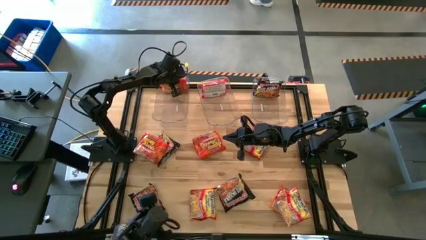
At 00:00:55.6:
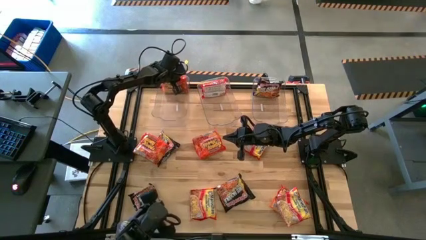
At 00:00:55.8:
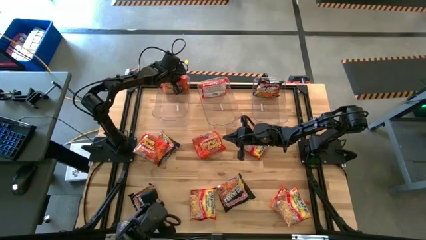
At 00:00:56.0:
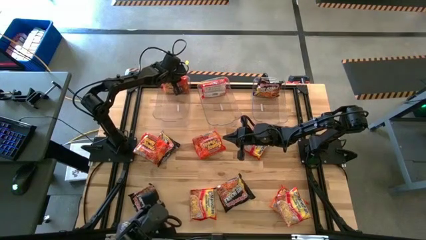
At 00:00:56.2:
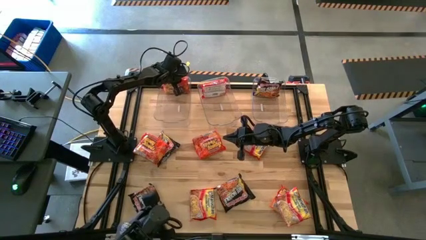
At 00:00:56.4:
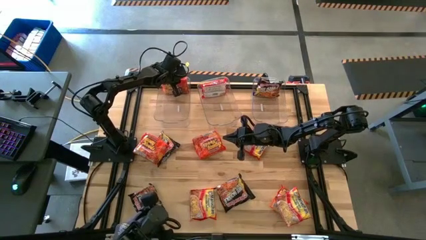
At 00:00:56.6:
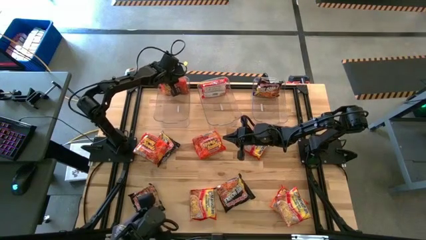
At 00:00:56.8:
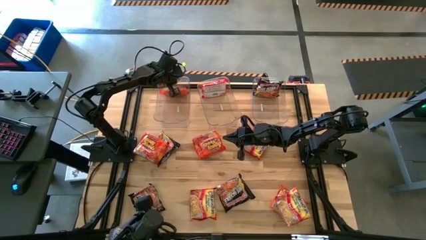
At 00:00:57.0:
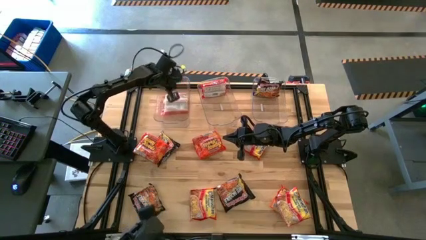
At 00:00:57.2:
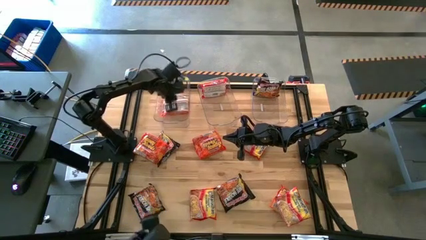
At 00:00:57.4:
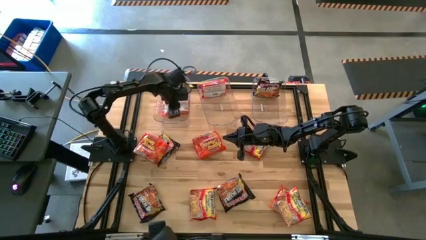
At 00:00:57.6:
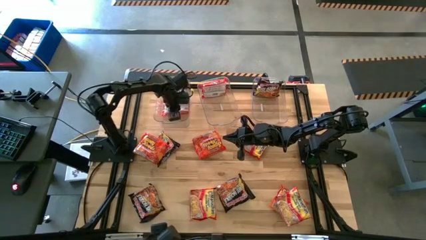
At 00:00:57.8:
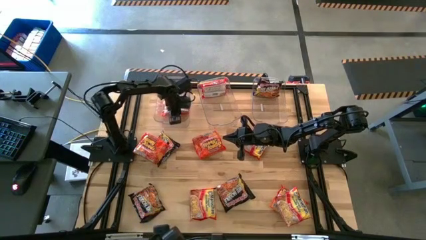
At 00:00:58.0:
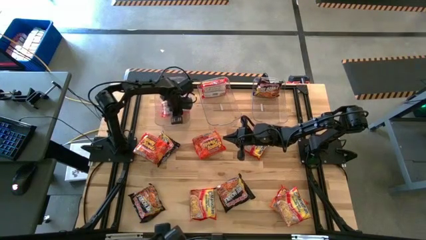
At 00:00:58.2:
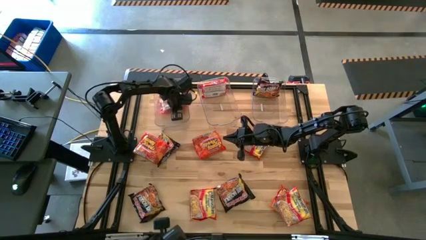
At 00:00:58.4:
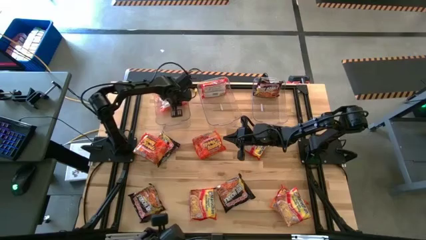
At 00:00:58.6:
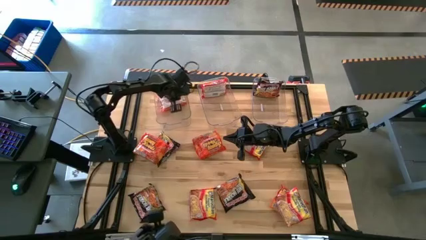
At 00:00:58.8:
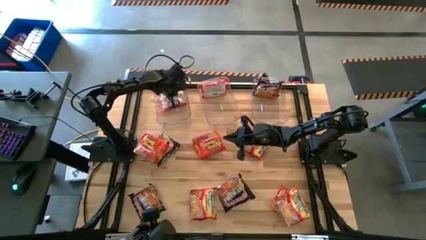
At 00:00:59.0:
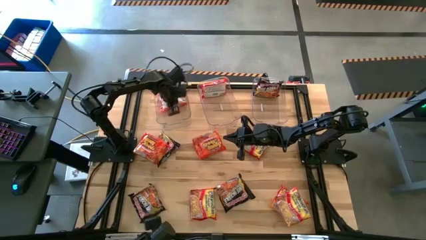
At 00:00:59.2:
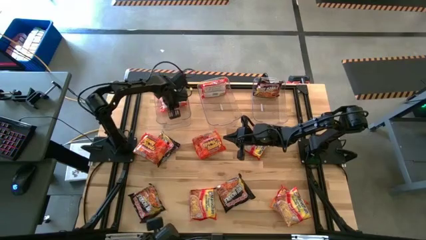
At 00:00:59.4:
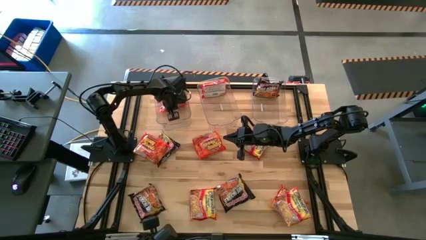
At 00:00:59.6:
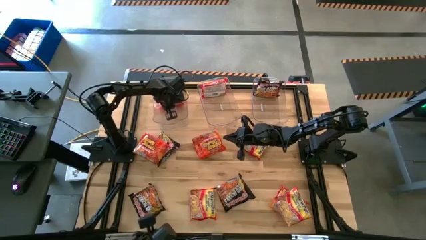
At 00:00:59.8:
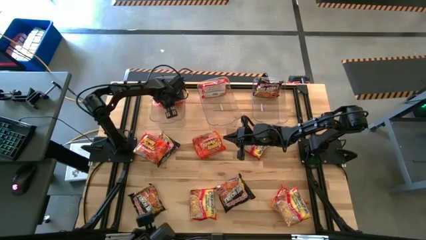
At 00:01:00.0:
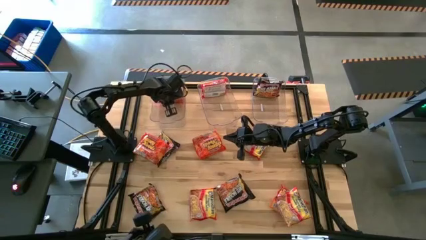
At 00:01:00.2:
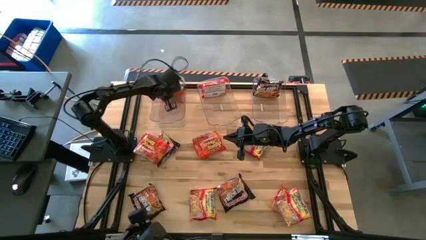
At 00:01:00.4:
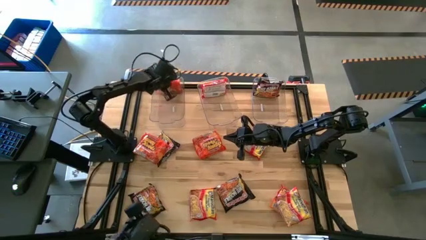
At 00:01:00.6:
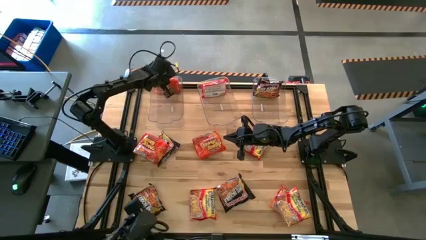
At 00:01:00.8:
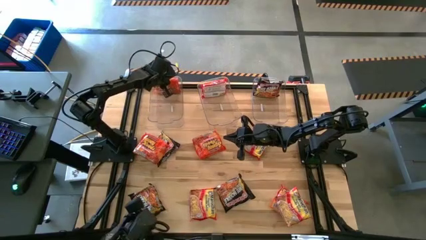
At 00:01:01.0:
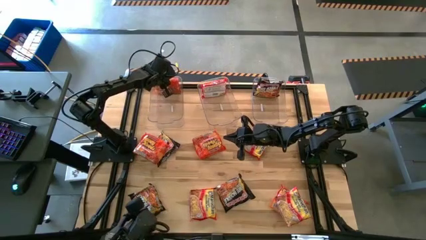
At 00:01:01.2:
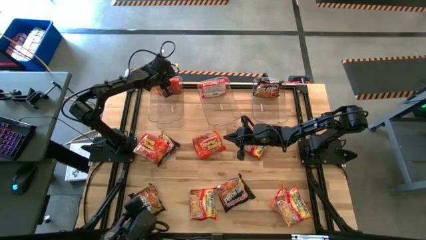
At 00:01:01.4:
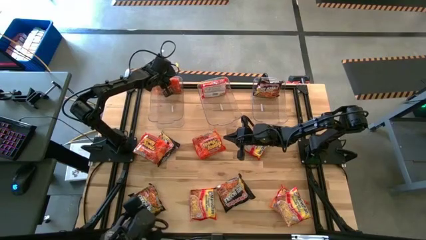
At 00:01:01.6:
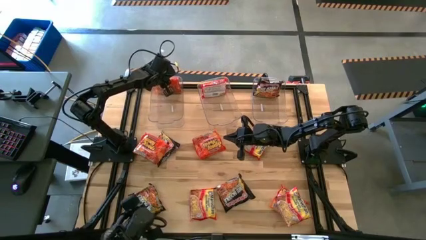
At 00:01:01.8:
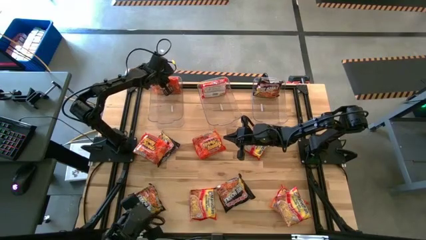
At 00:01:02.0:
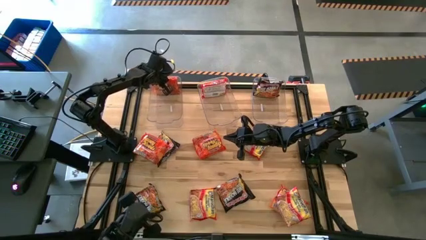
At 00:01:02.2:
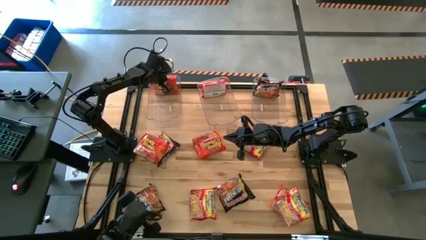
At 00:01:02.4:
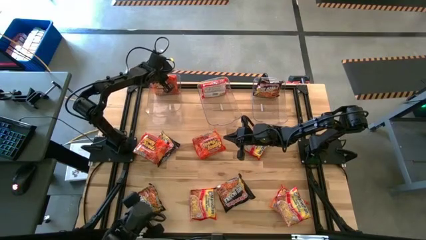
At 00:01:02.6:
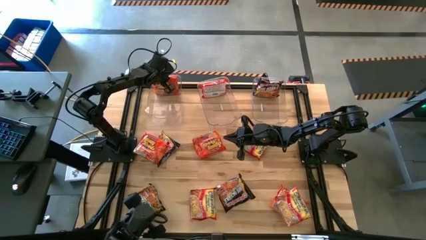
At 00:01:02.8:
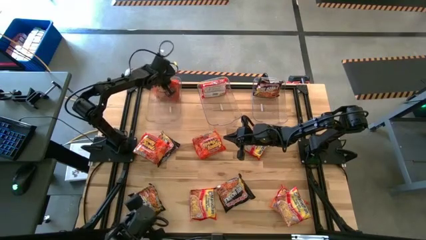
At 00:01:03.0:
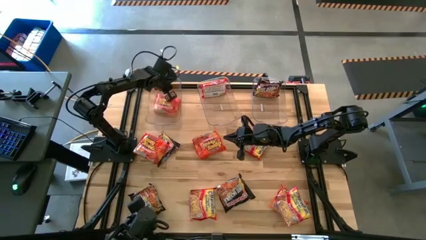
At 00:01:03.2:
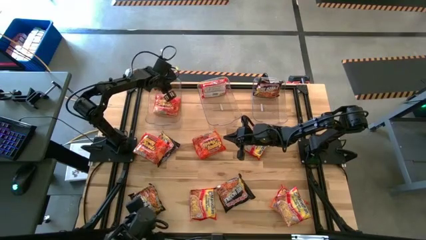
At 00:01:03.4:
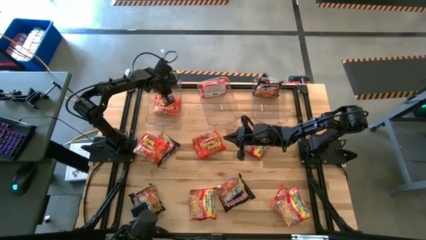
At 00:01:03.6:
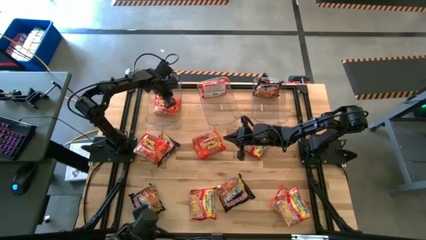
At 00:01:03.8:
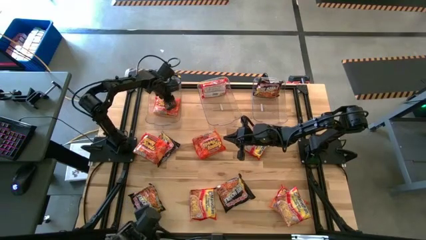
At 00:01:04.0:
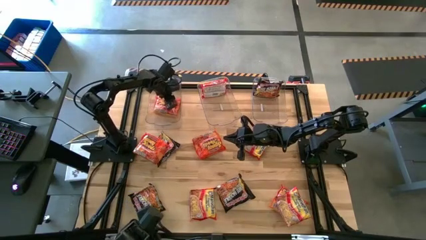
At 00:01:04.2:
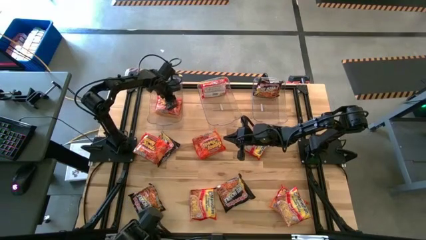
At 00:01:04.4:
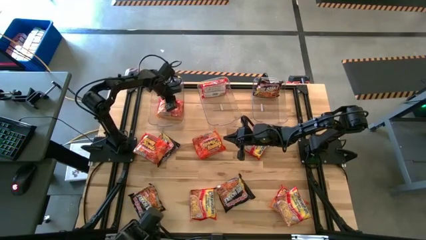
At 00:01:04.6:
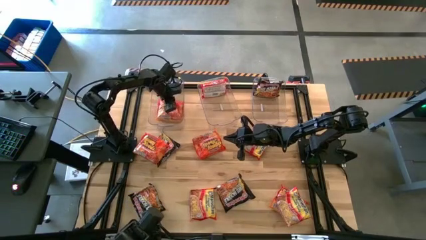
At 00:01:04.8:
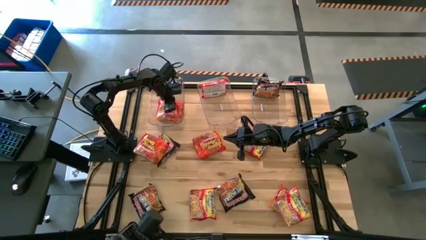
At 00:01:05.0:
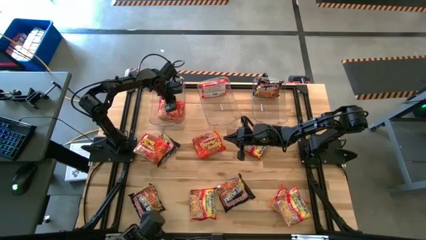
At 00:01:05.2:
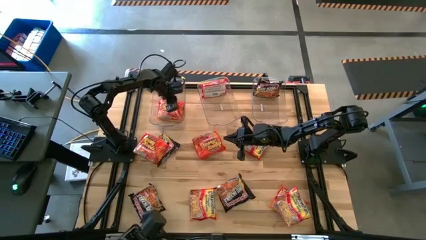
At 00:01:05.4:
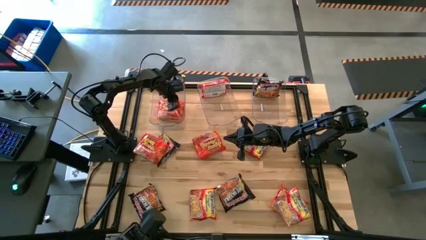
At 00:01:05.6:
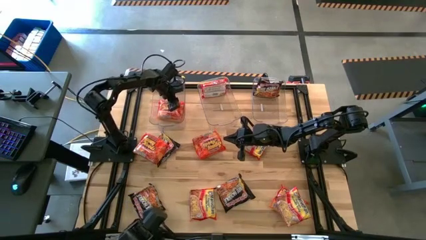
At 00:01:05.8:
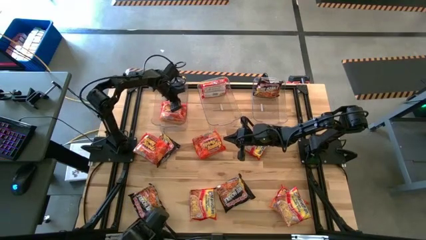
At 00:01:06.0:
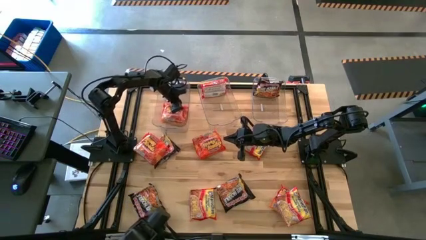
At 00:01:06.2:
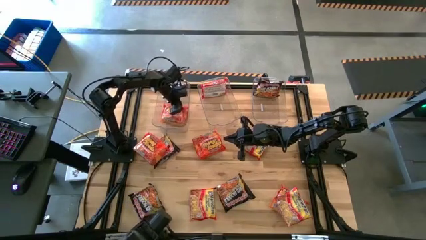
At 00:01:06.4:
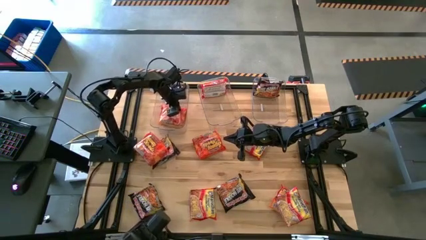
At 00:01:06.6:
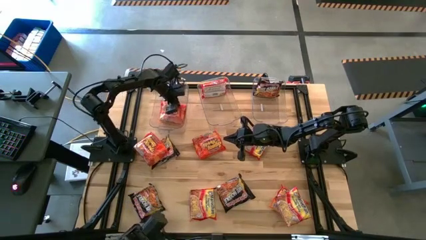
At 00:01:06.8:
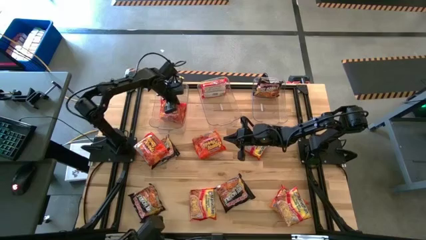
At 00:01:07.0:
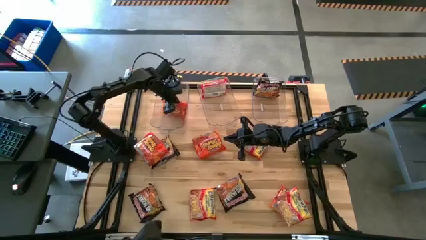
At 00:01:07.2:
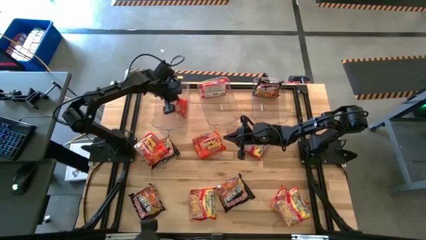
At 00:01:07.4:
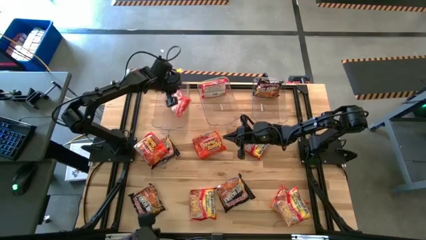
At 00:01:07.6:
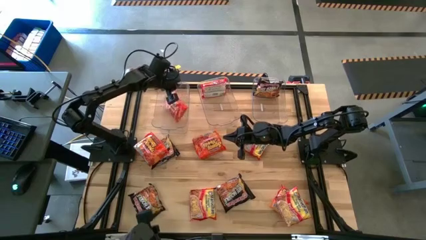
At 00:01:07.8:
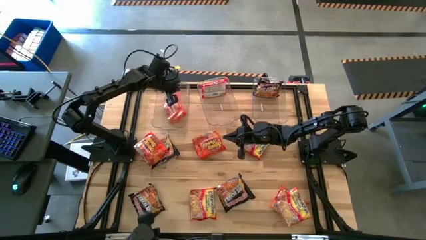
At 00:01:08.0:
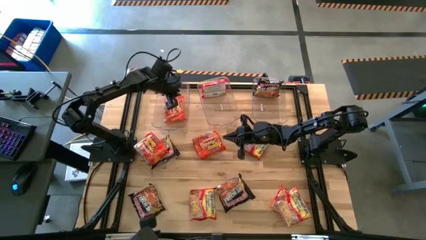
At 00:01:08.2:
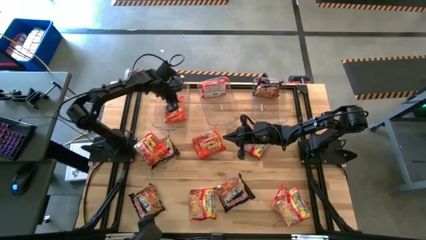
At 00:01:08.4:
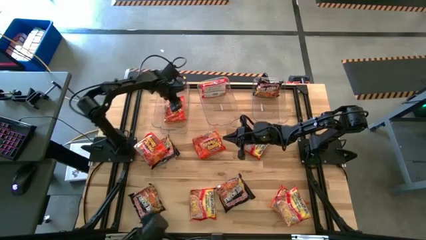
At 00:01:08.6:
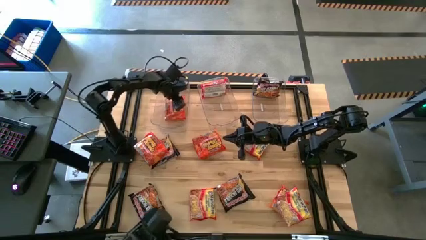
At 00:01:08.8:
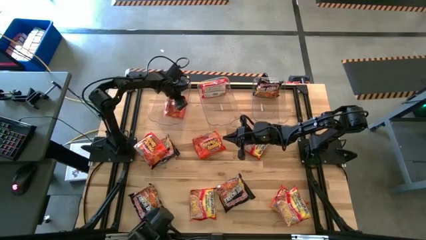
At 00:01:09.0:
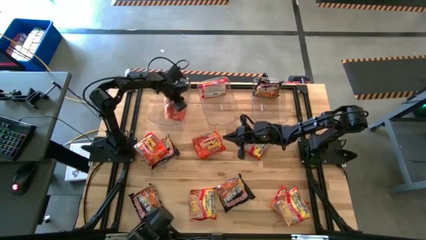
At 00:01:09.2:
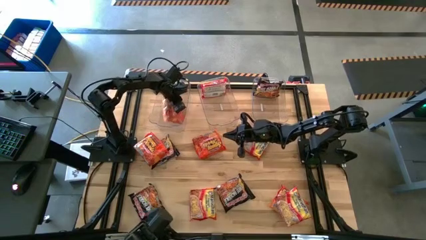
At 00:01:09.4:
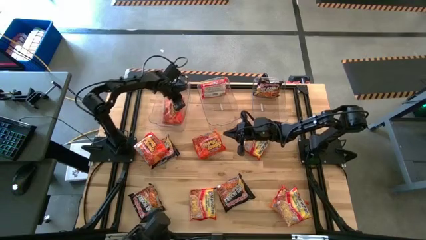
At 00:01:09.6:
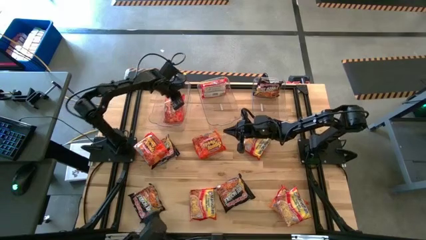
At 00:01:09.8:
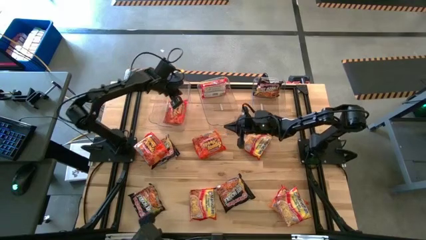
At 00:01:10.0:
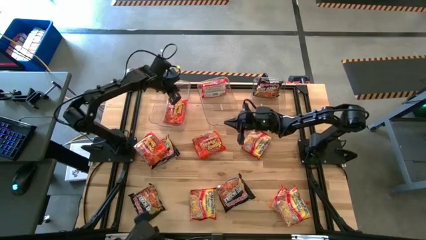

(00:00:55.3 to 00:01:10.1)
Task: Sort Maruchan noodles
Put the orange noodle pack into the left transparent bin
